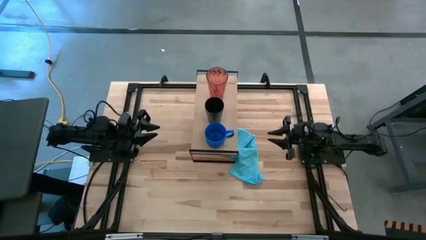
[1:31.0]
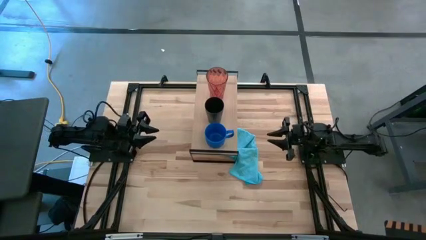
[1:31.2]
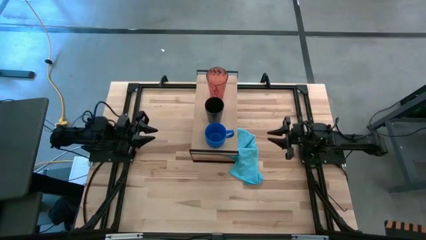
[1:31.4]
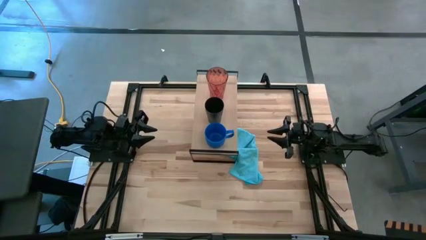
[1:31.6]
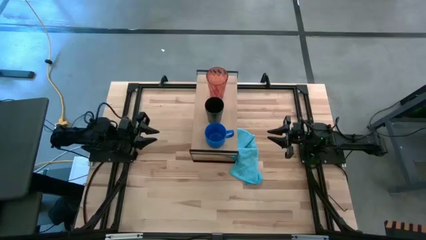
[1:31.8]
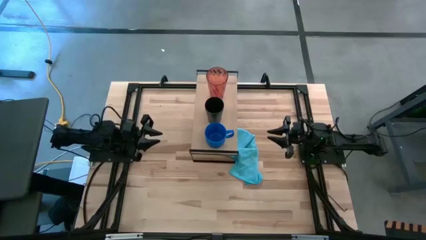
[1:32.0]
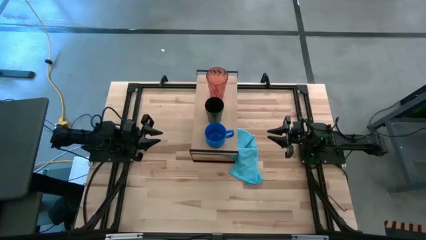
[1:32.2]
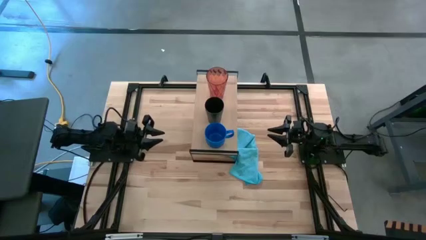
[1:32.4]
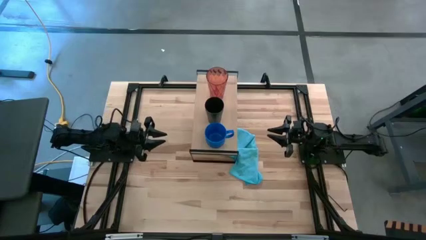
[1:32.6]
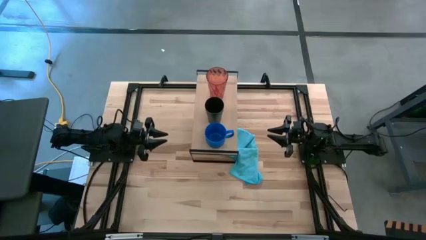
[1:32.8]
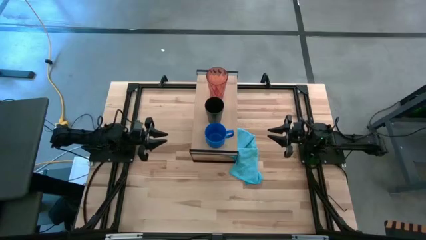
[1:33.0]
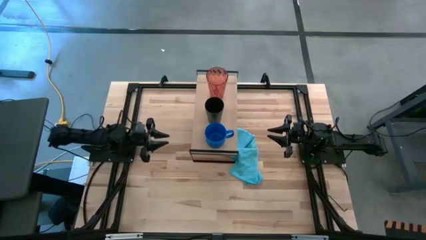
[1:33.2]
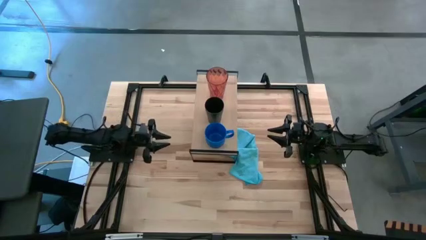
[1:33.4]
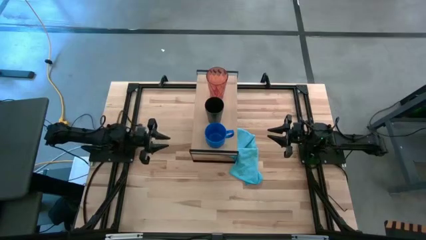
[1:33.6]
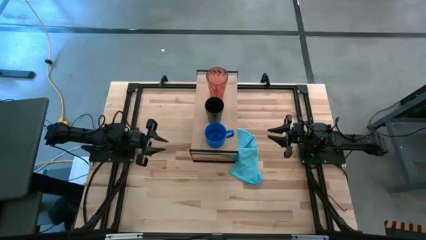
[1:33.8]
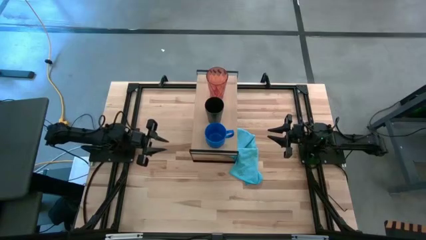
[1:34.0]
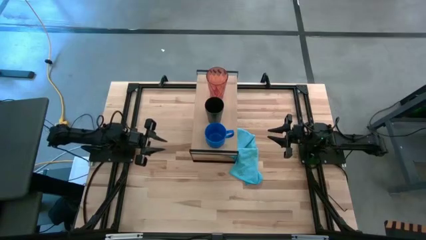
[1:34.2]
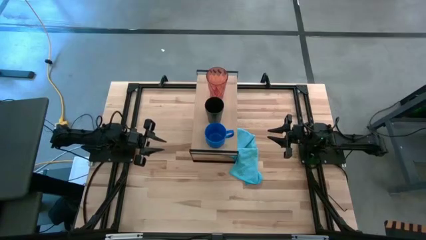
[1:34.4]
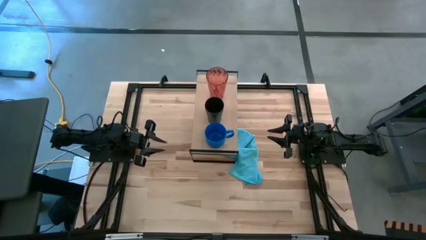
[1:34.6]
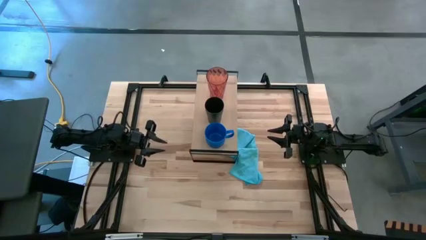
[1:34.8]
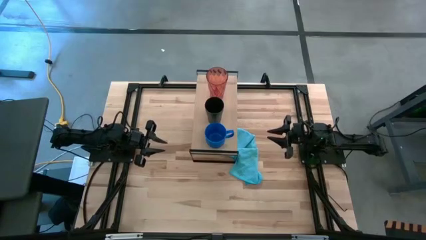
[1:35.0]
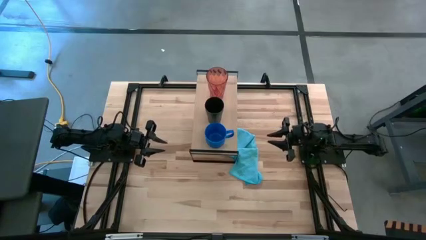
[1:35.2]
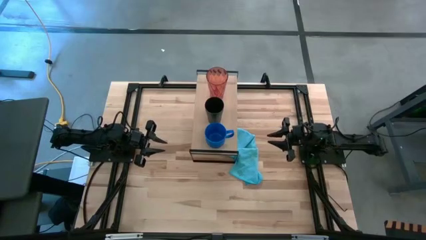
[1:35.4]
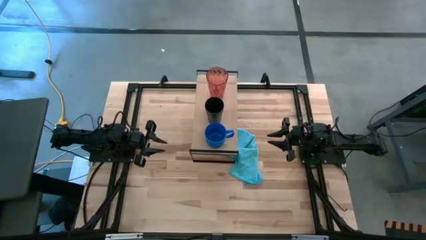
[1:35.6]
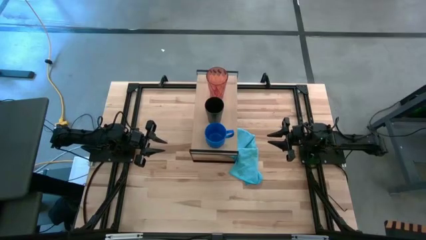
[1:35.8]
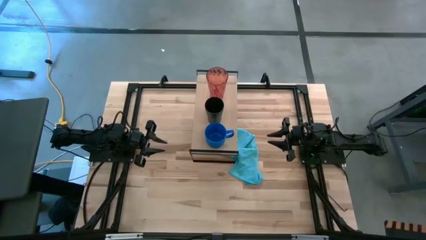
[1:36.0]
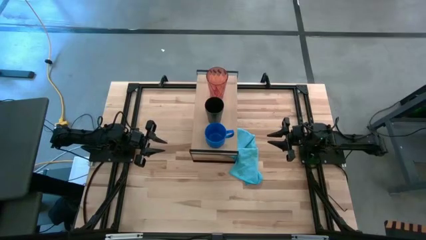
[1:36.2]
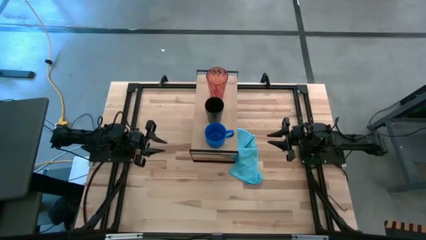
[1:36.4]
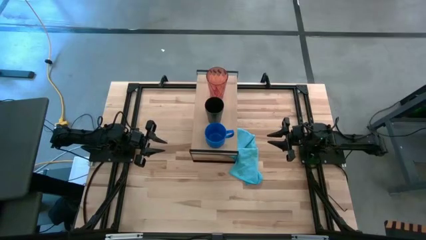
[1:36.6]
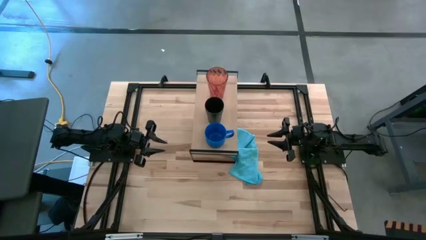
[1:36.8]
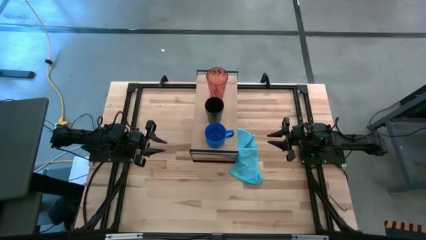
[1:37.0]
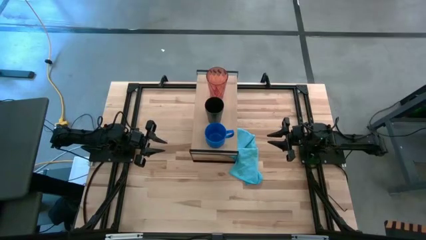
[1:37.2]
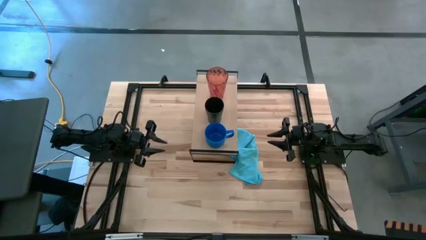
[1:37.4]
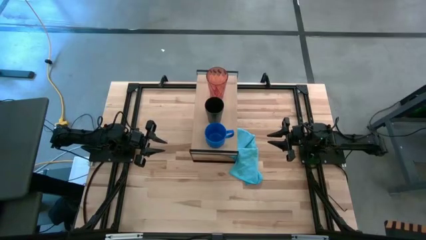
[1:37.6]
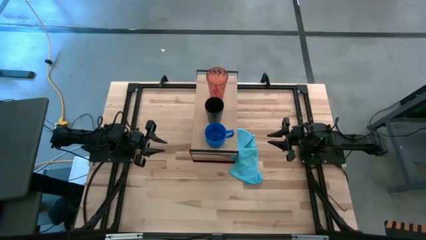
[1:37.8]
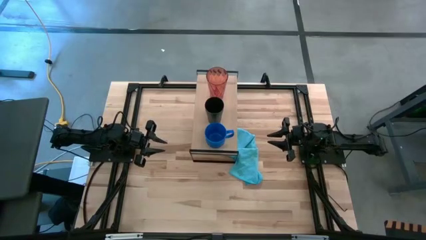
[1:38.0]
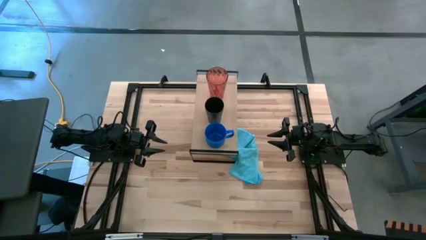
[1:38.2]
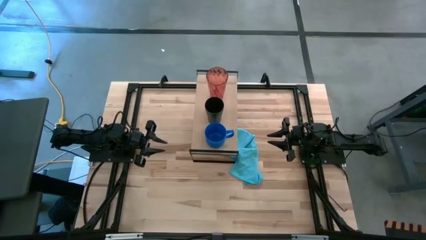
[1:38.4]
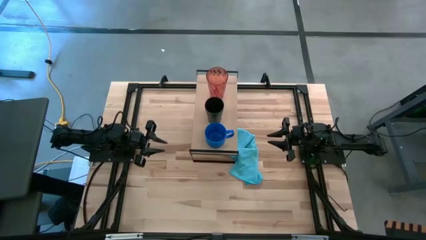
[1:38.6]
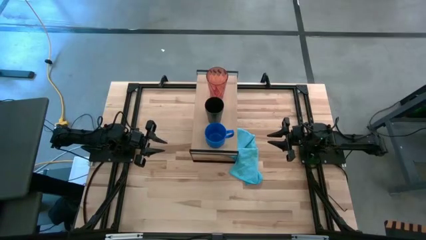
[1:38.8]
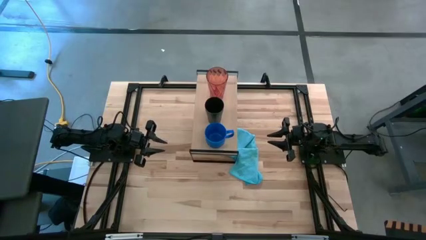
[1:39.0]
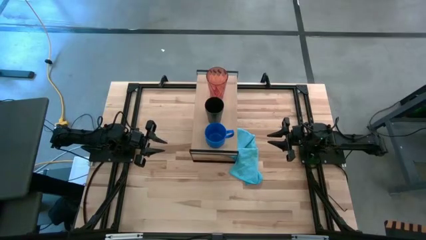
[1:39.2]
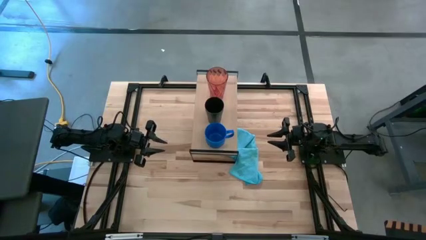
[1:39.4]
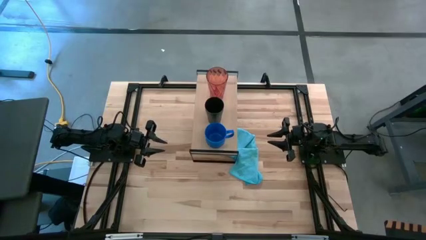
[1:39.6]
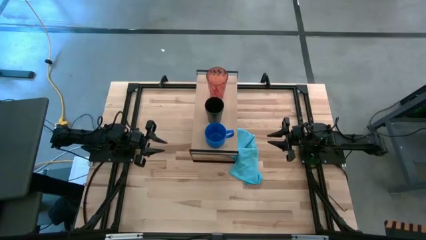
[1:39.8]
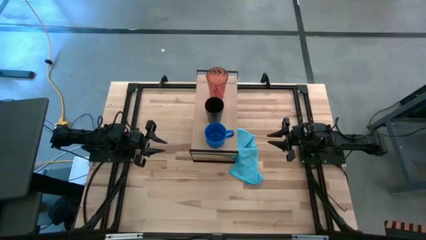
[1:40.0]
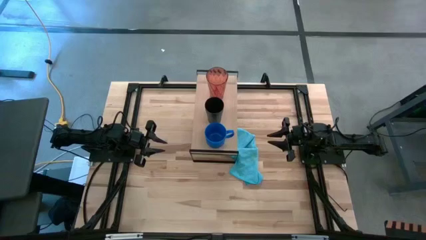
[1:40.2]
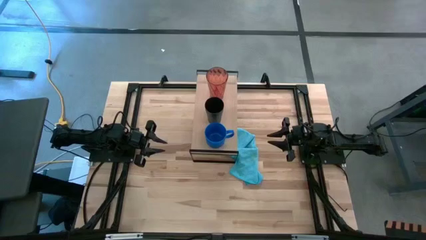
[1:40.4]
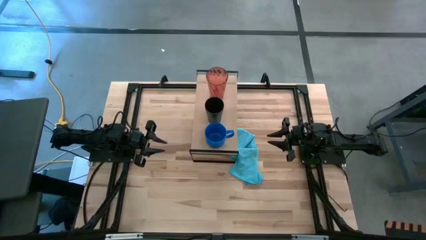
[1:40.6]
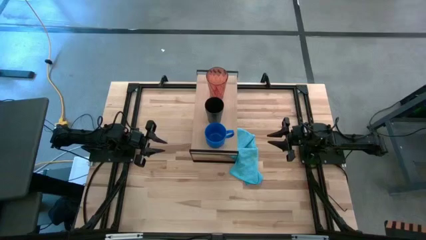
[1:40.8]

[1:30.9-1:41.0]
Task: Stack small to large cups/mugs on shelf
Return to Home Position
